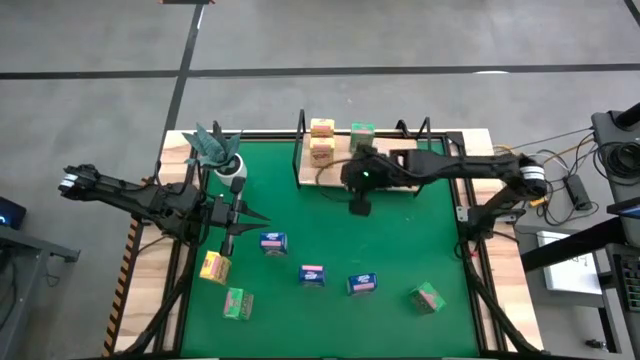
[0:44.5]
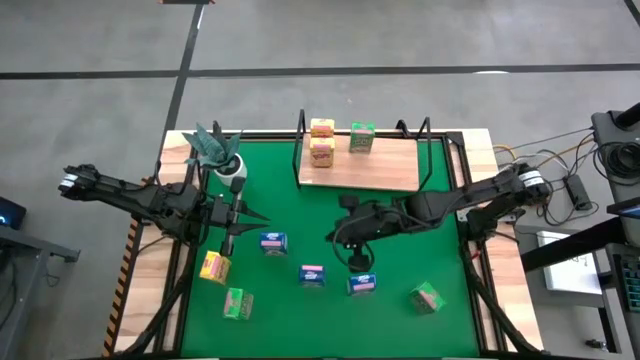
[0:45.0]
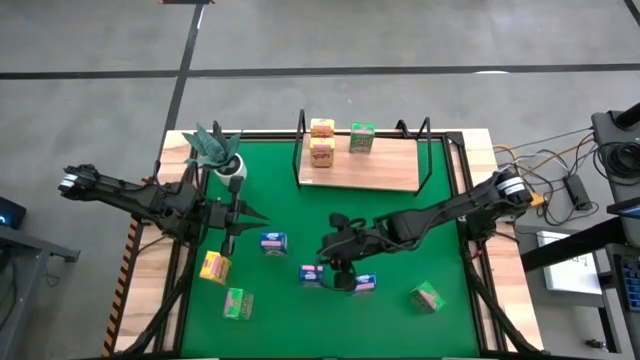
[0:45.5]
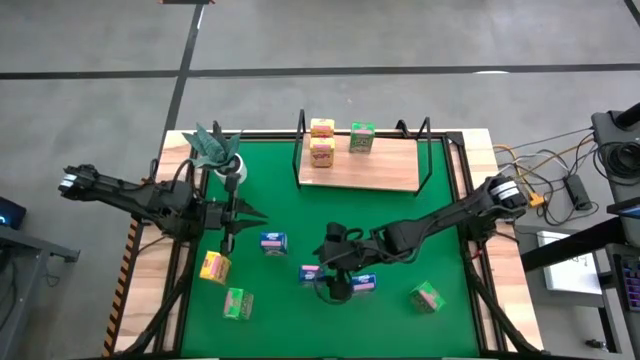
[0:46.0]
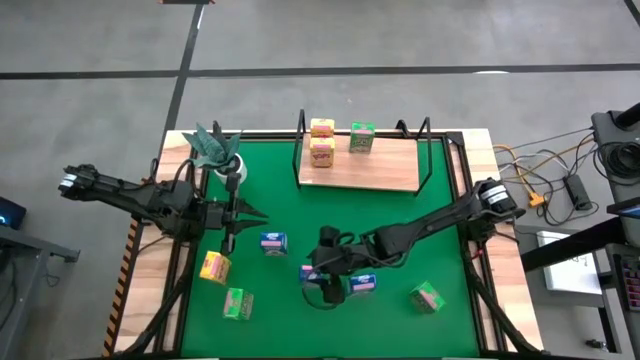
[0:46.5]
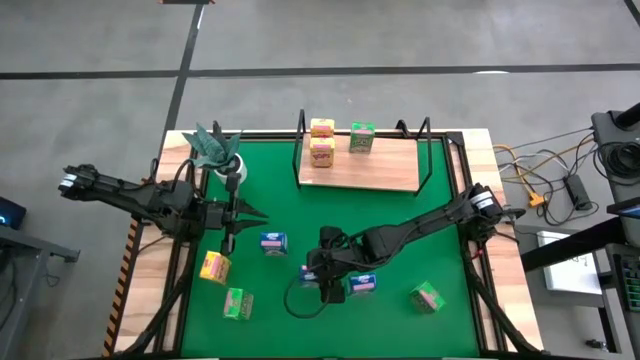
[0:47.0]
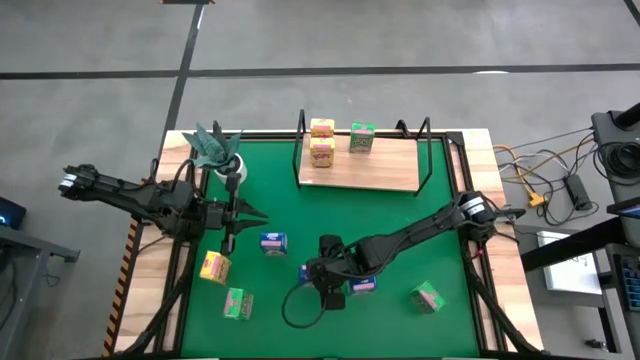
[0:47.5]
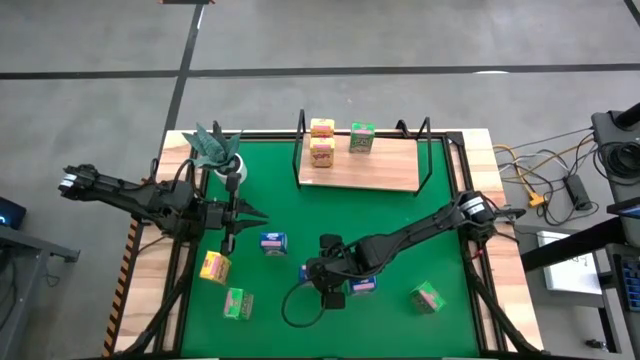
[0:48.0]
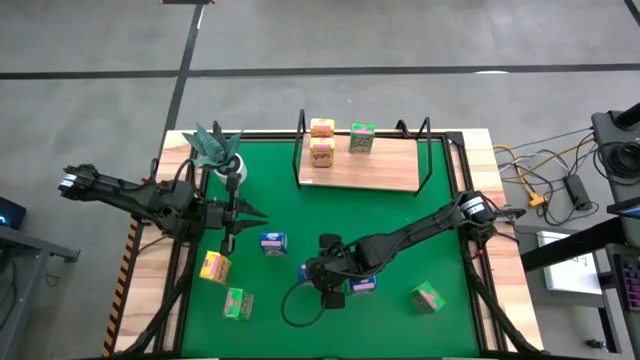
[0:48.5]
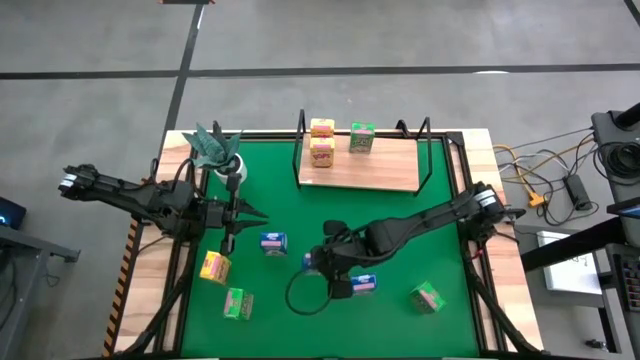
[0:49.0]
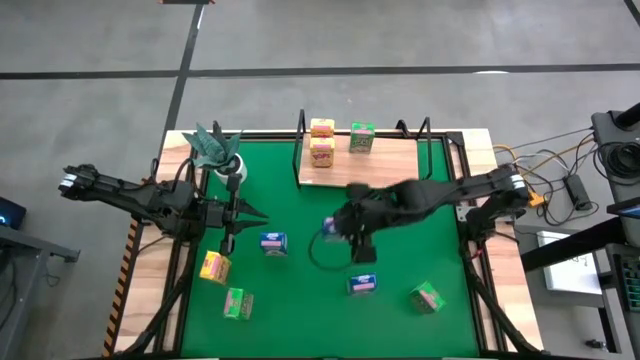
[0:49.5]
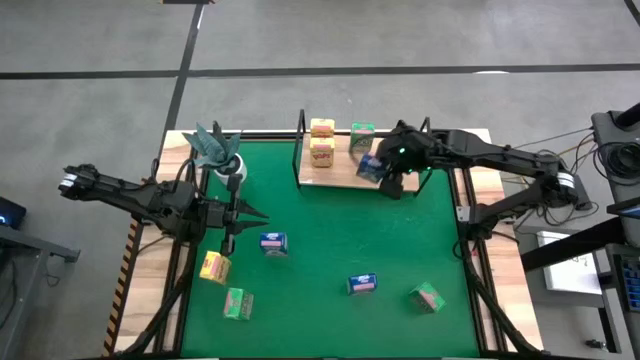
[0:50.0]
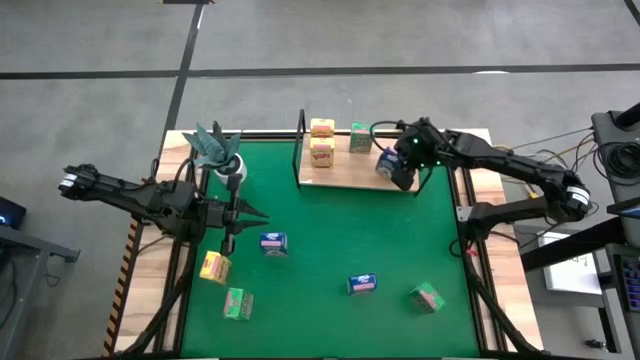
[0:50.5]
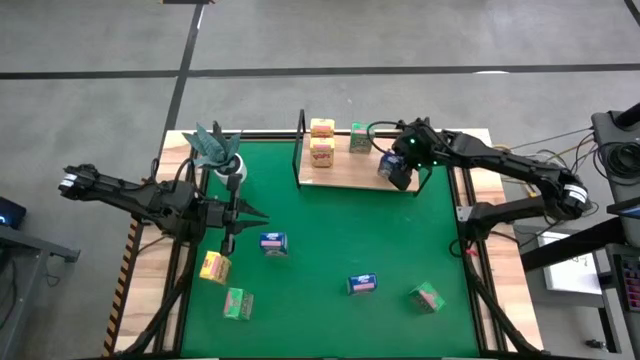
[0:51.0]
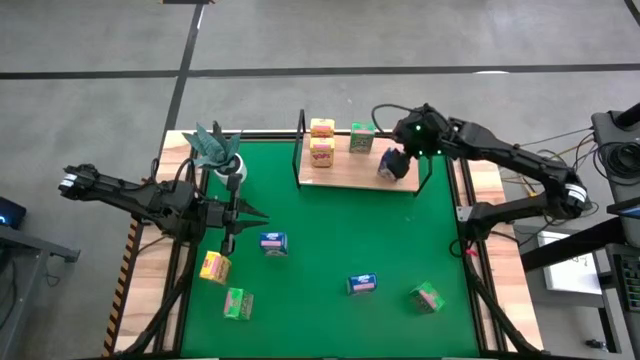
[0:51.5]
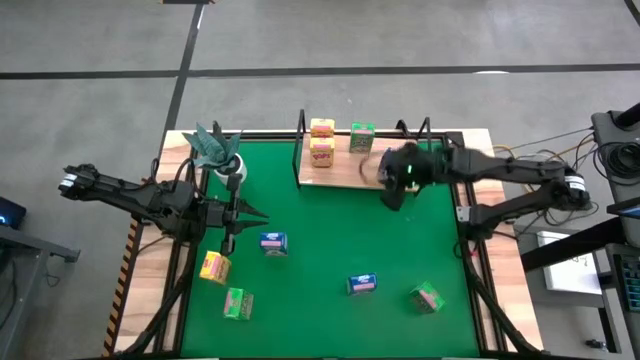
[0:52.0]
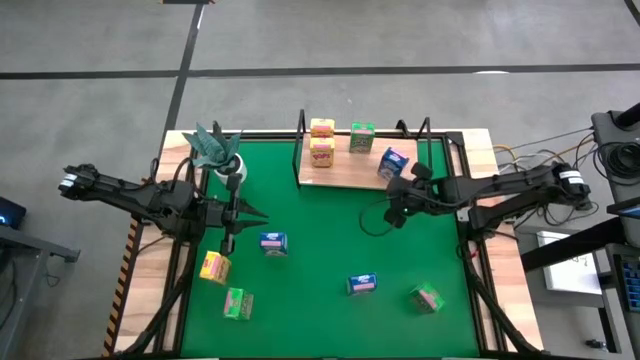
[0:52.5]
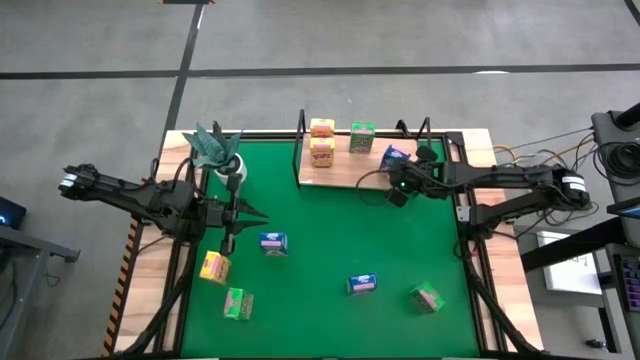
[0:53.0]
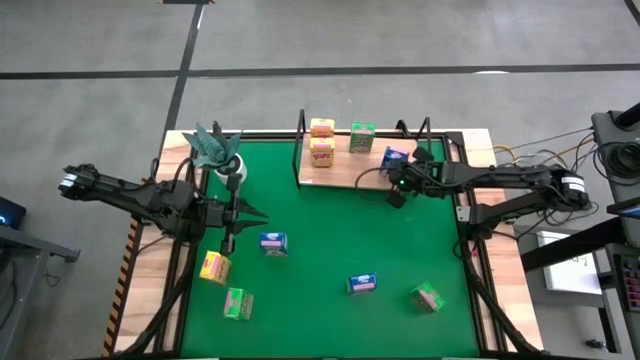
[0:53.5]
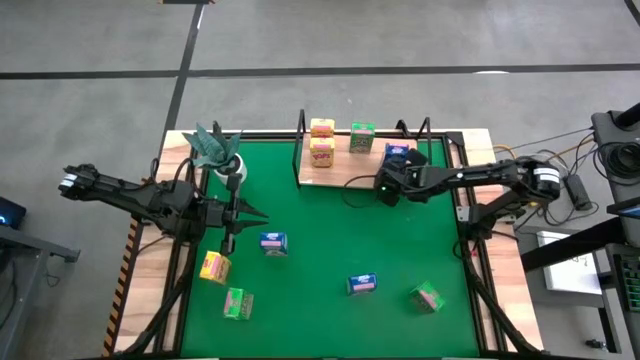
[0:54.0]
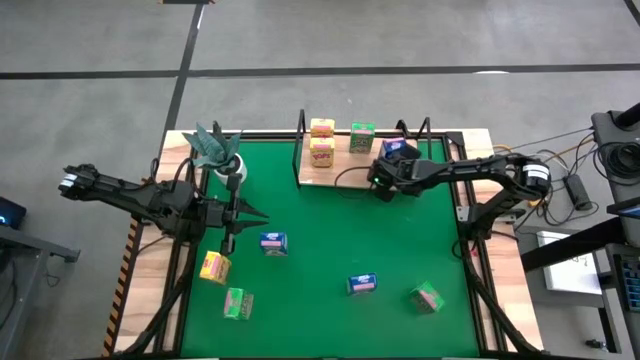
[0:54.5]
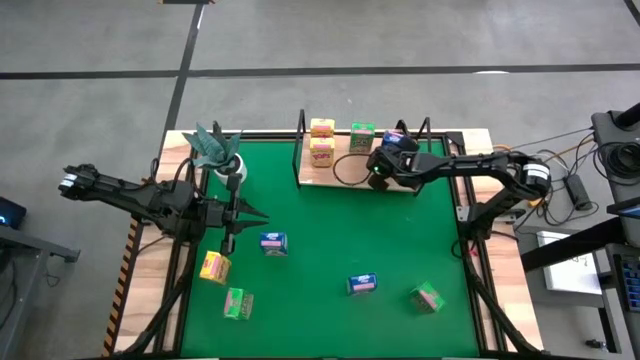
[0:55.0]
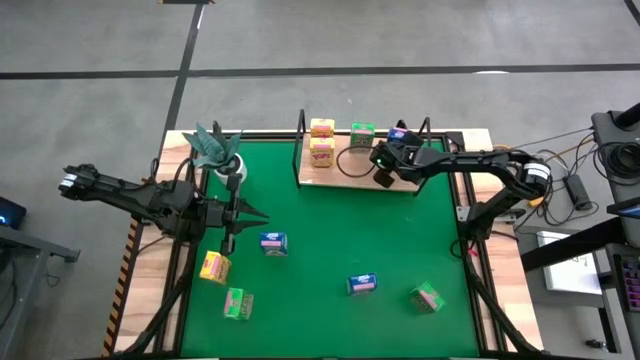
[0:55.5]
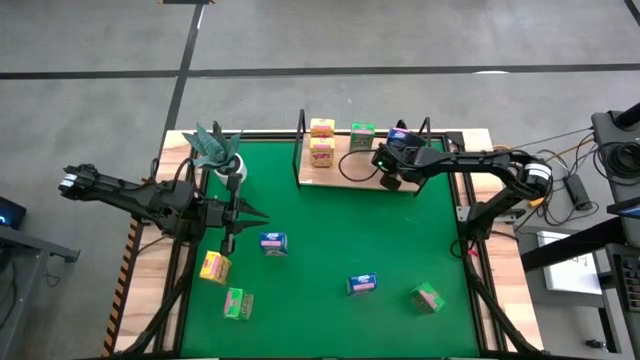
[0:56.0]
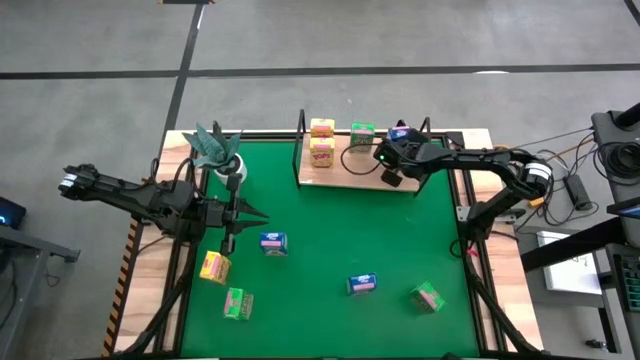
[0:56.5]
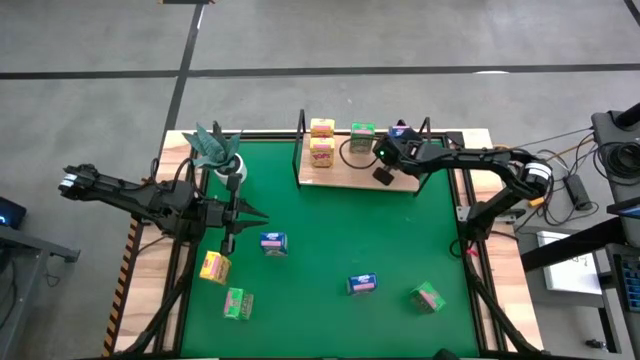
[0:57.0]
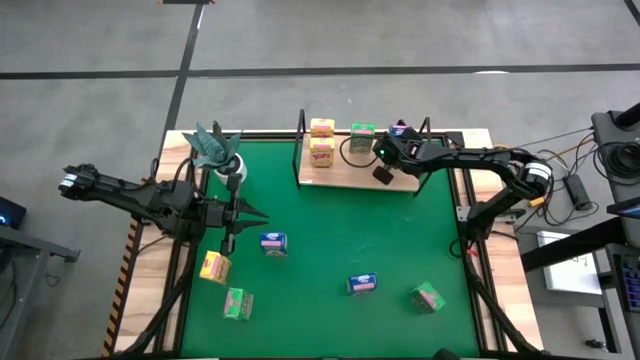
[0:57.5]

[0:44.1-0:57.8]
Task: Stack cereal on shelf
Put the center blue cereal box on the shelf

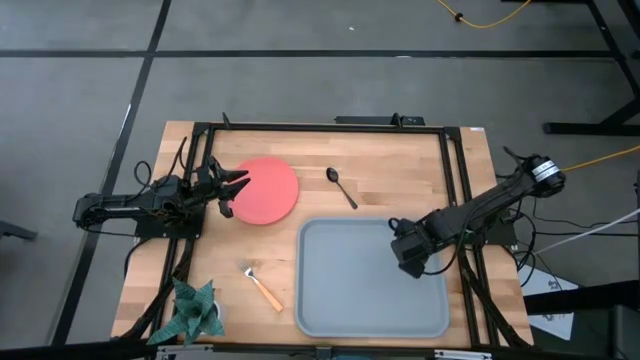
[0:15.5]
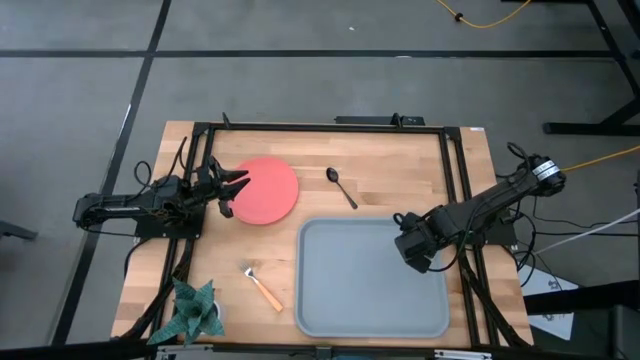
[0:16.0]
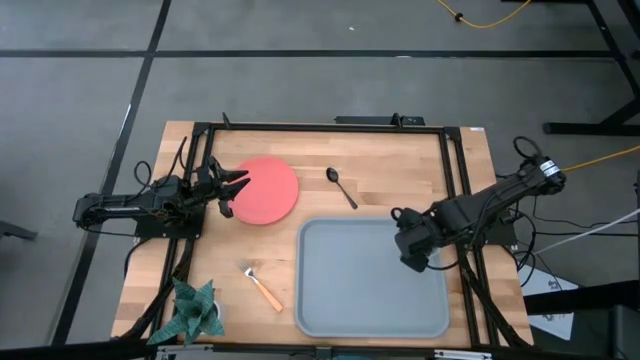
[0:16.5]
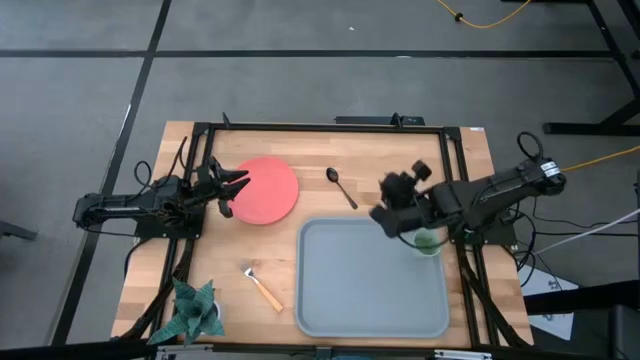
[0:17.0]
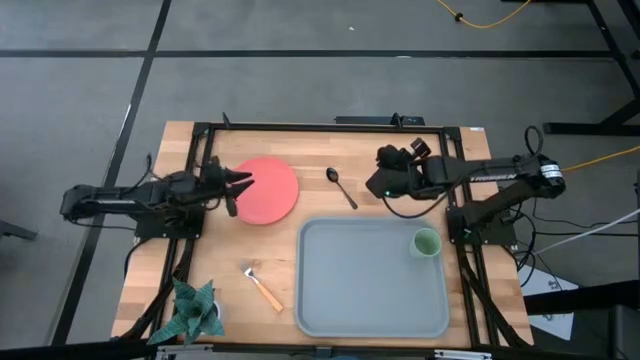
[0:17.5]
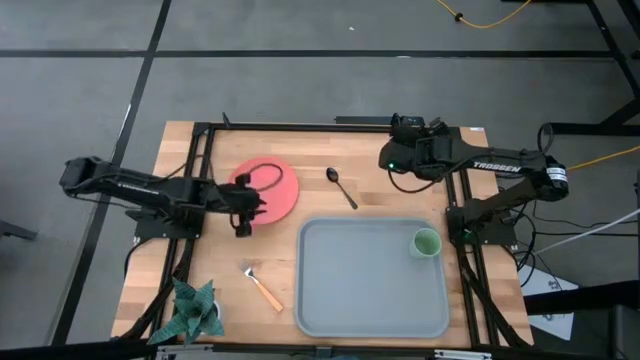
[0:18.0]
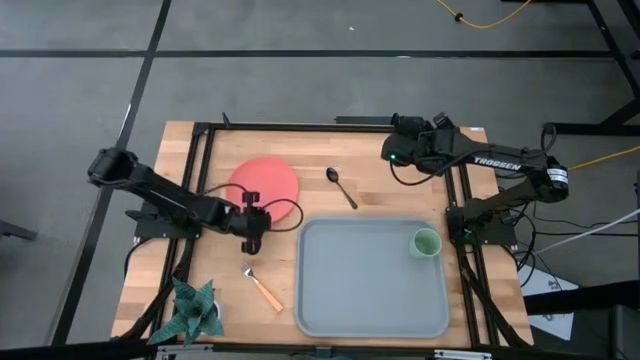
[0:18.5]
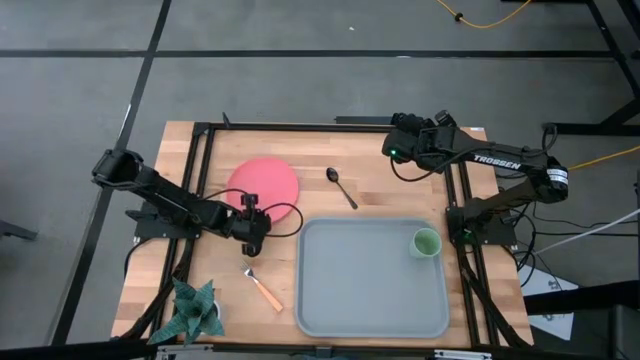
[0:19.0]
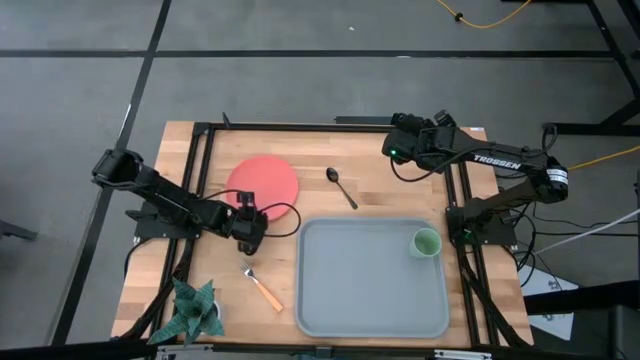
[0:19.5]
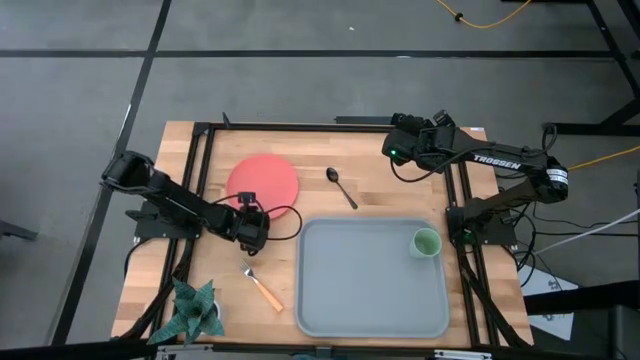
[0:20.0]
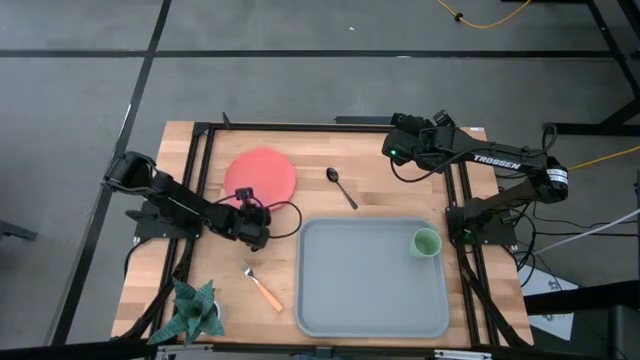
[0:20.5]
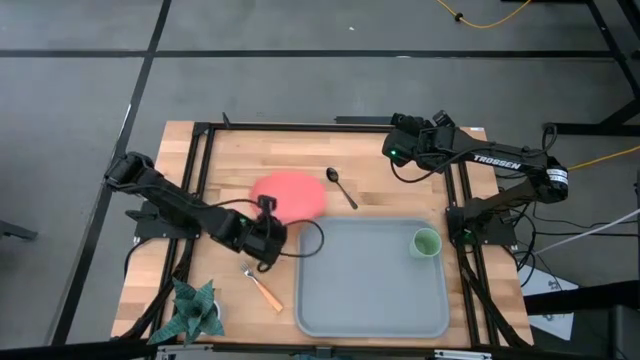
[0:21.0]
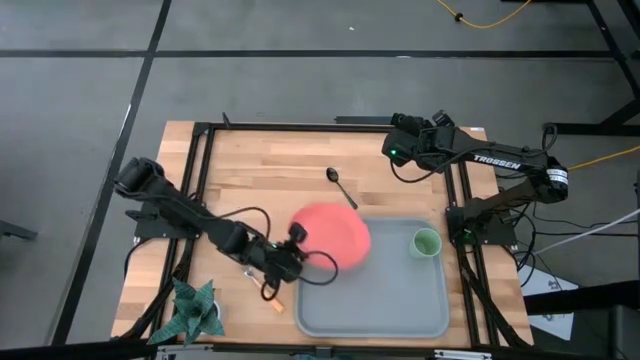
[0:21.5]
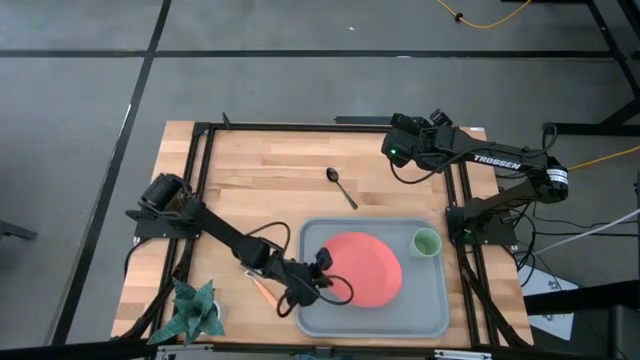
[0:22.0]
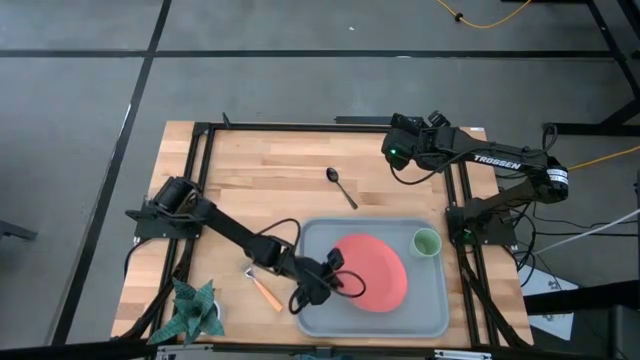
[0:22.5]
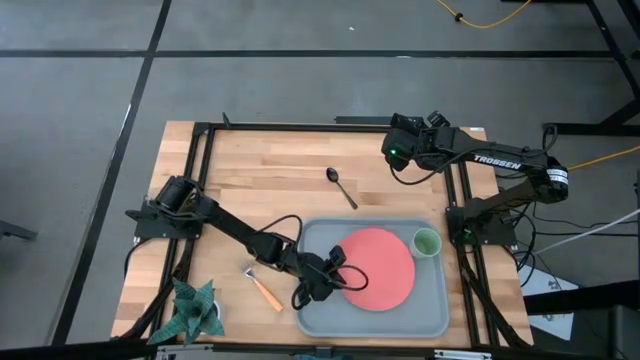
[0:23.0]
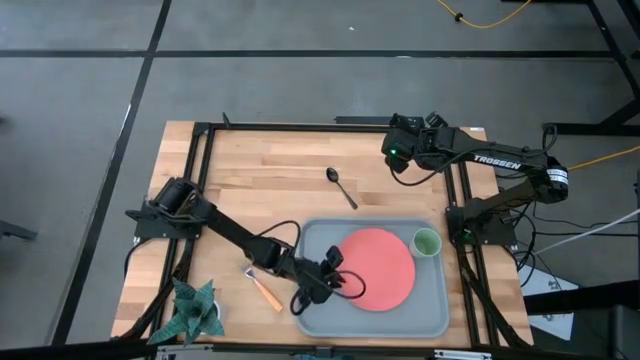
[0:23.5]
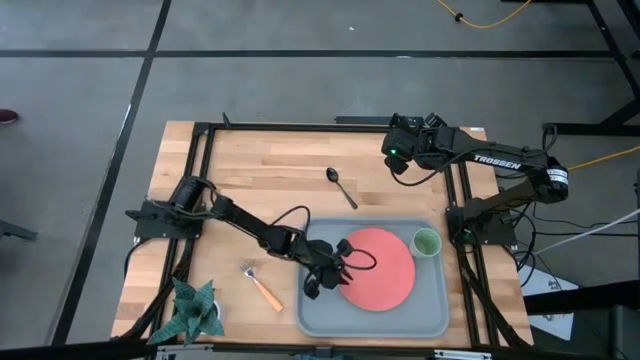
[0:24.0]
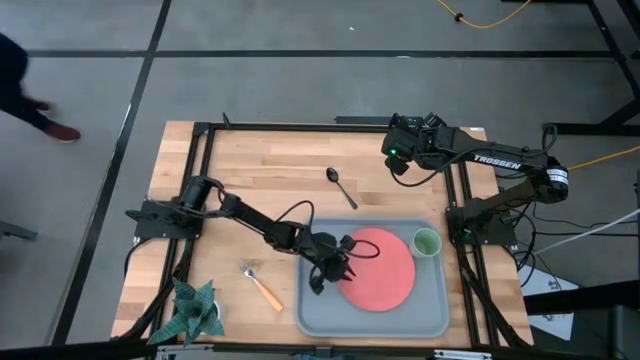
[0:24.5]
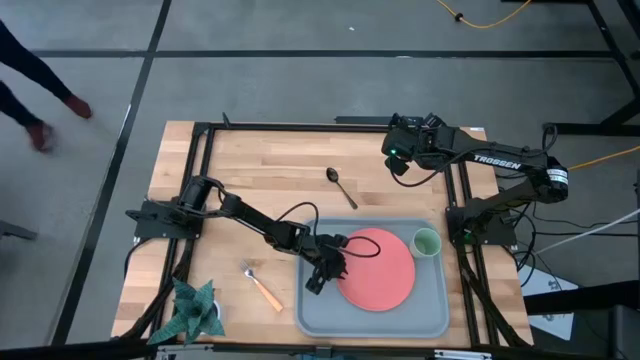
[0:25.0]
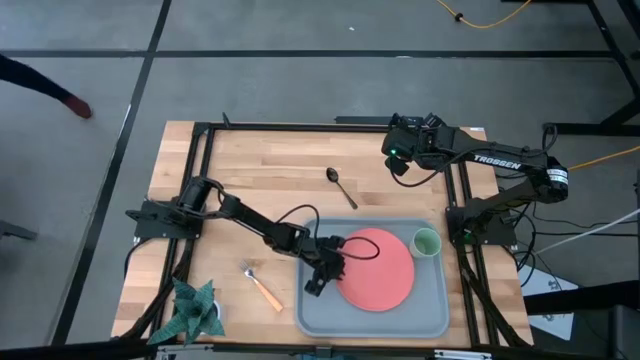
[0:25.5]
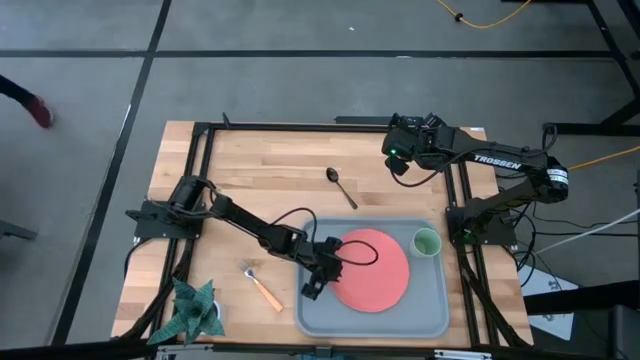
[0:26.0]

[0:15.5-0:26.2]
Task: Pick and place plate/cup/fork/spoon on tray
Put the pink plate on the light blue tray
